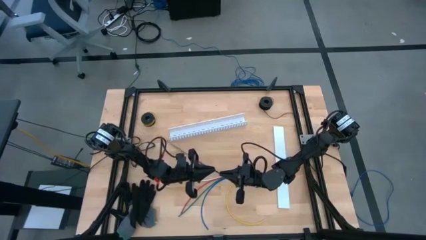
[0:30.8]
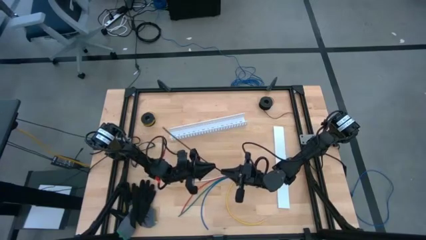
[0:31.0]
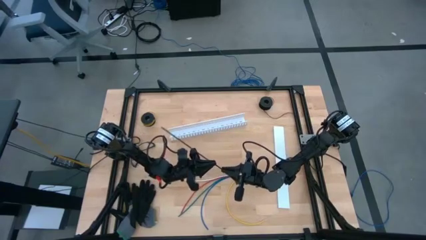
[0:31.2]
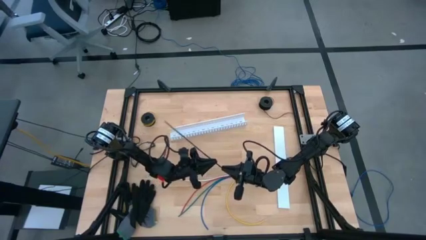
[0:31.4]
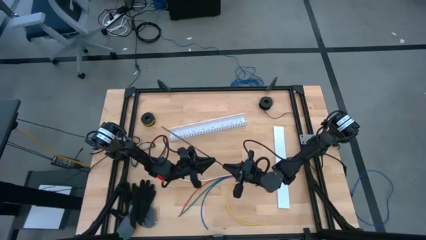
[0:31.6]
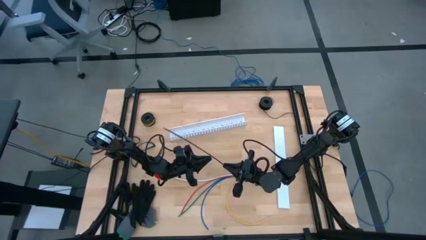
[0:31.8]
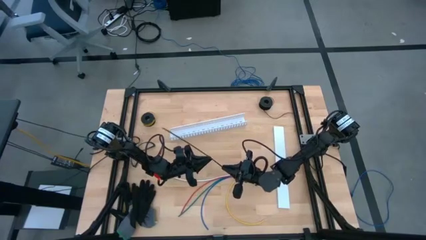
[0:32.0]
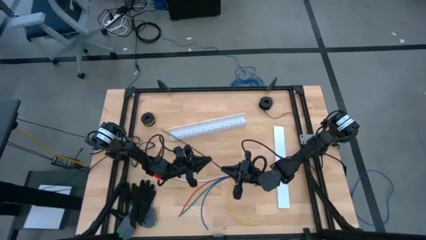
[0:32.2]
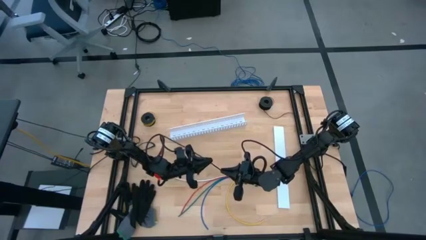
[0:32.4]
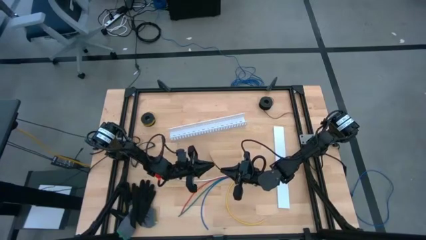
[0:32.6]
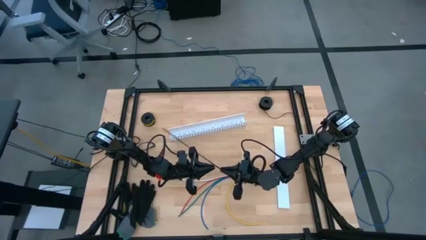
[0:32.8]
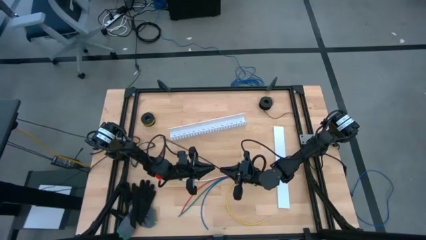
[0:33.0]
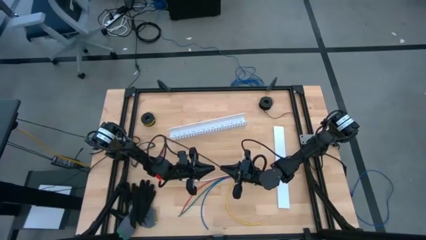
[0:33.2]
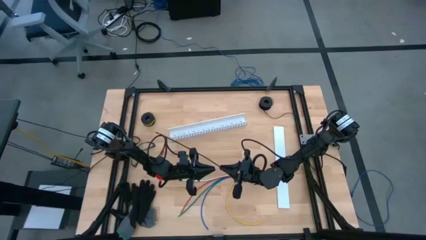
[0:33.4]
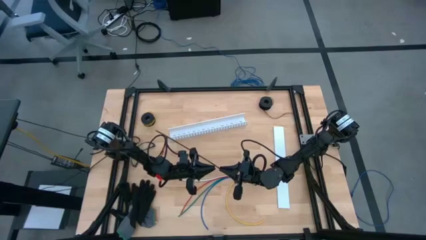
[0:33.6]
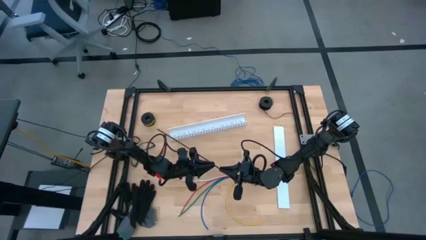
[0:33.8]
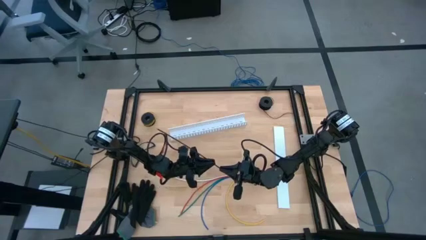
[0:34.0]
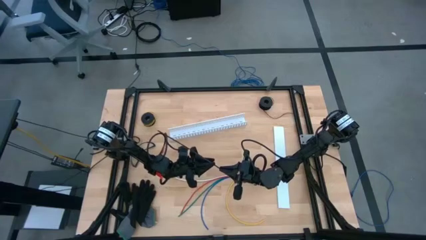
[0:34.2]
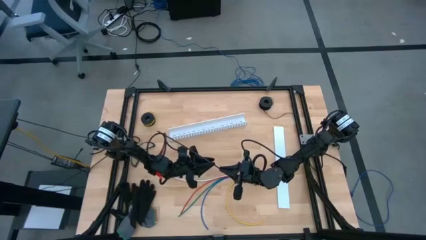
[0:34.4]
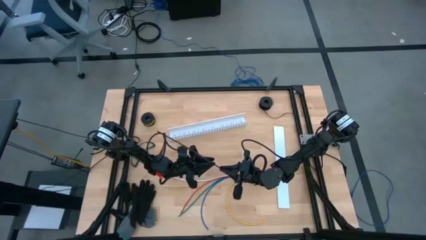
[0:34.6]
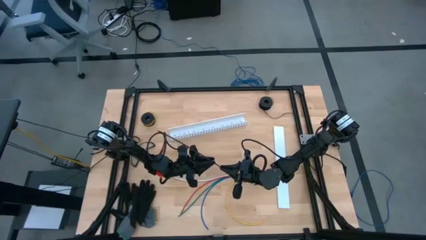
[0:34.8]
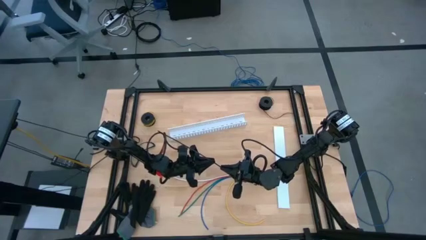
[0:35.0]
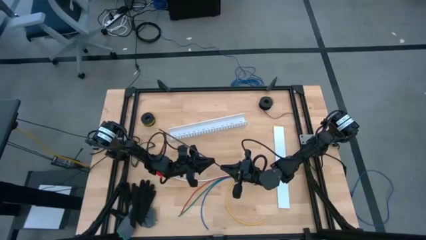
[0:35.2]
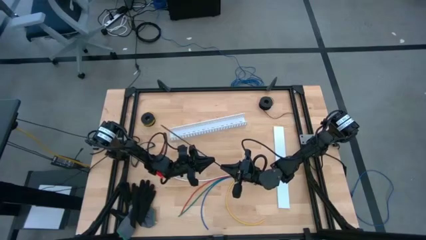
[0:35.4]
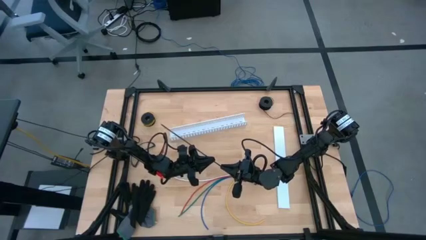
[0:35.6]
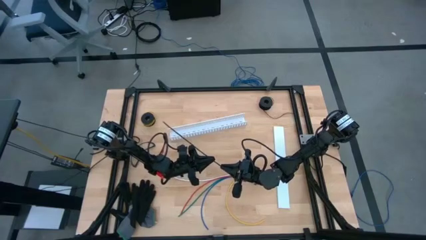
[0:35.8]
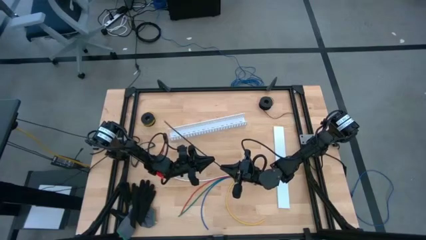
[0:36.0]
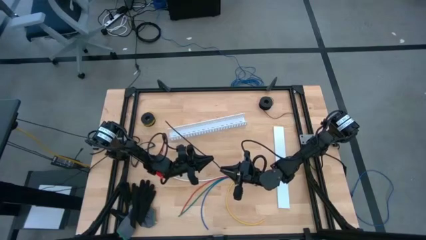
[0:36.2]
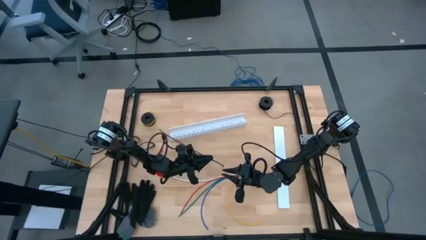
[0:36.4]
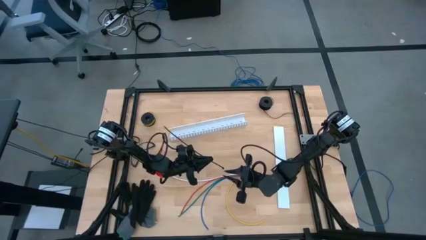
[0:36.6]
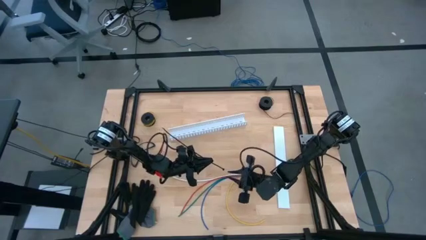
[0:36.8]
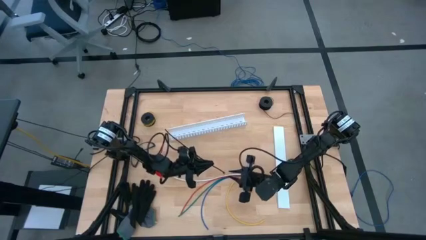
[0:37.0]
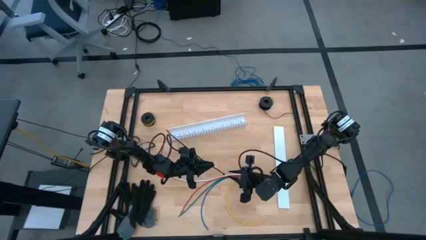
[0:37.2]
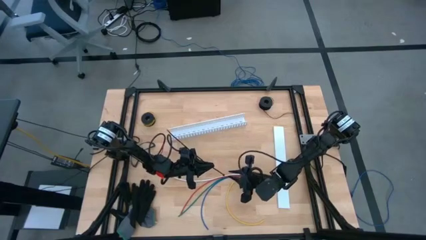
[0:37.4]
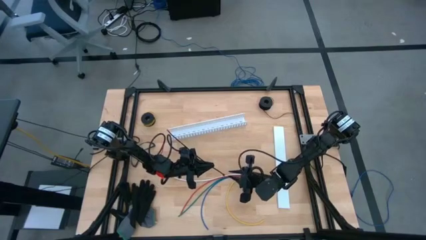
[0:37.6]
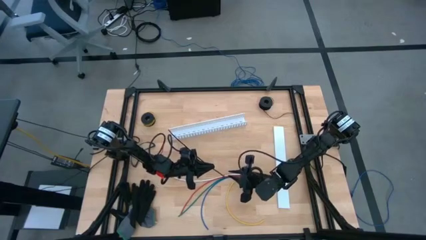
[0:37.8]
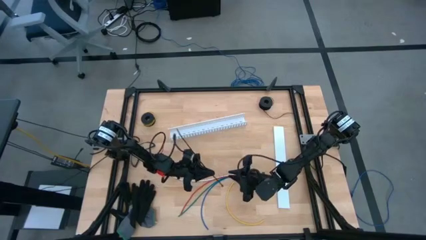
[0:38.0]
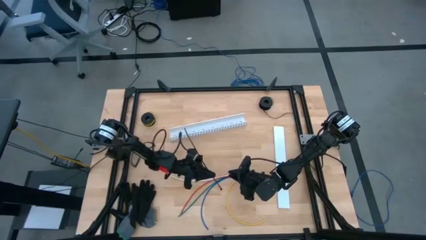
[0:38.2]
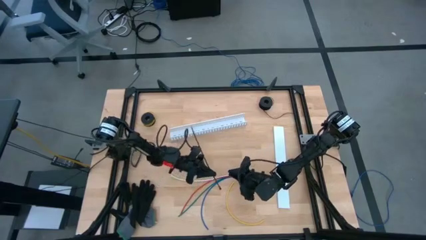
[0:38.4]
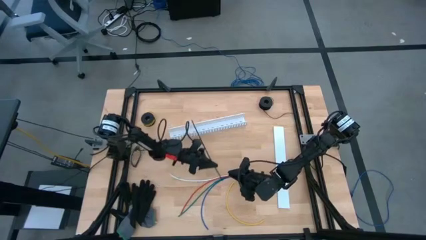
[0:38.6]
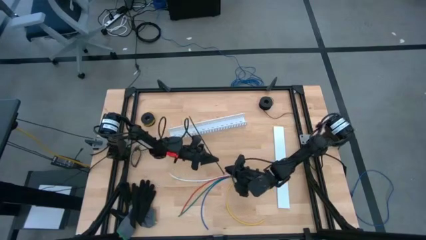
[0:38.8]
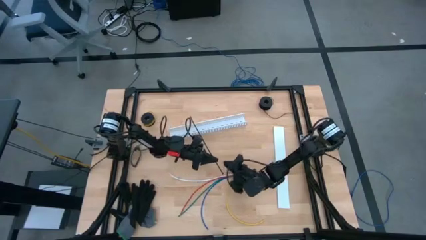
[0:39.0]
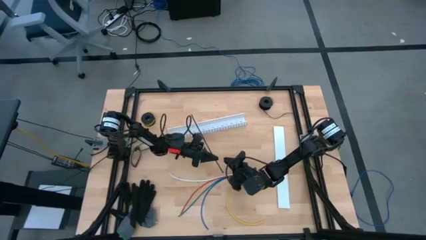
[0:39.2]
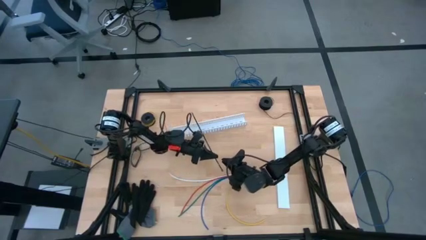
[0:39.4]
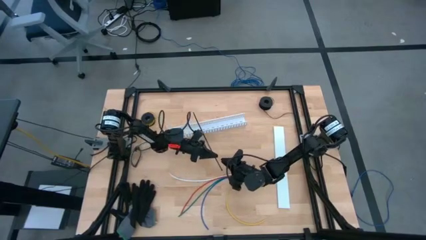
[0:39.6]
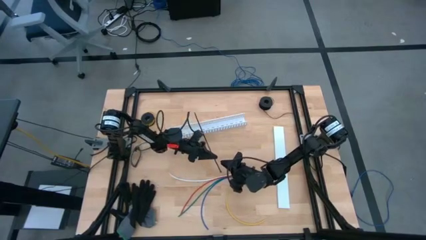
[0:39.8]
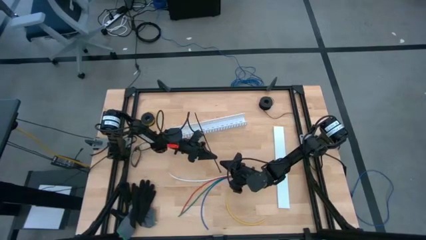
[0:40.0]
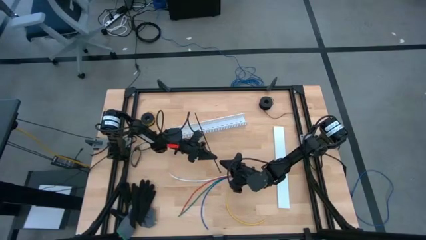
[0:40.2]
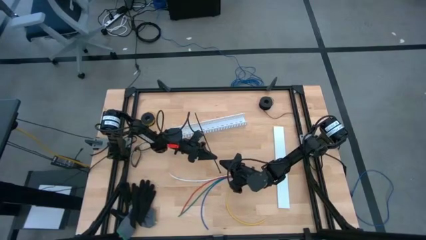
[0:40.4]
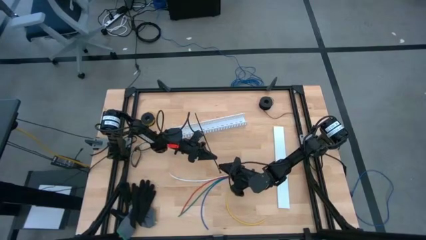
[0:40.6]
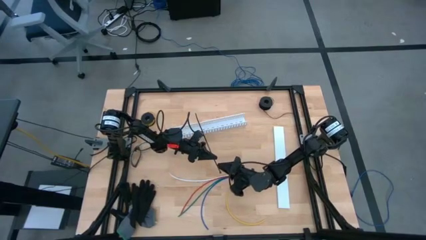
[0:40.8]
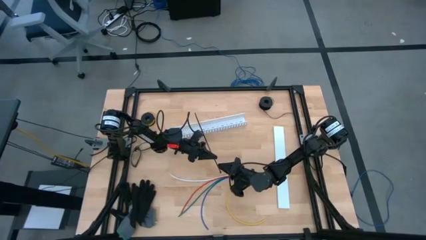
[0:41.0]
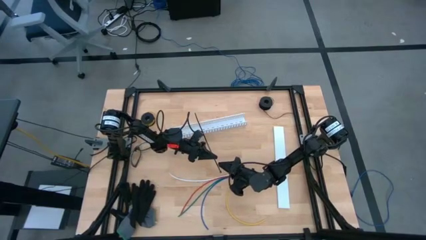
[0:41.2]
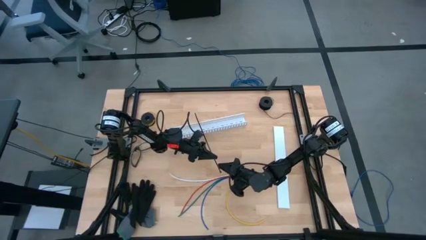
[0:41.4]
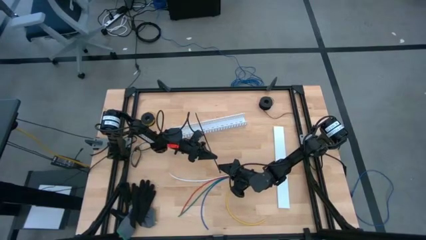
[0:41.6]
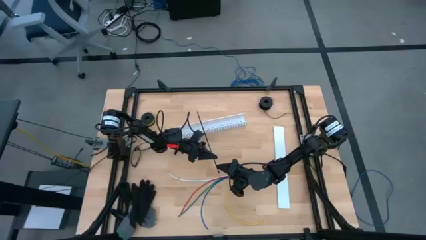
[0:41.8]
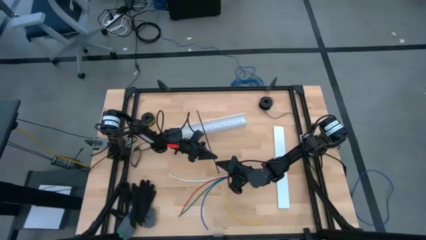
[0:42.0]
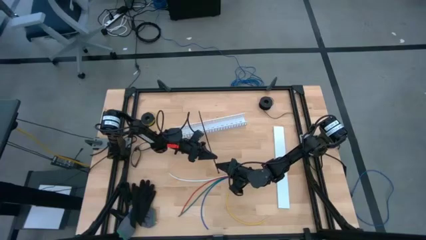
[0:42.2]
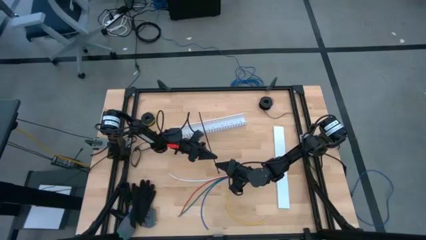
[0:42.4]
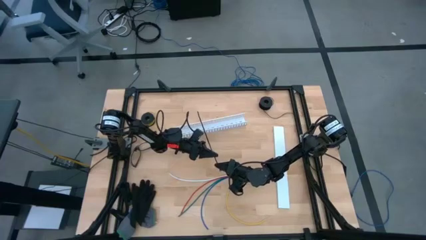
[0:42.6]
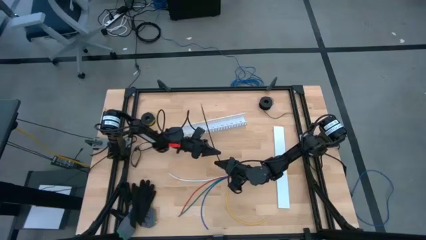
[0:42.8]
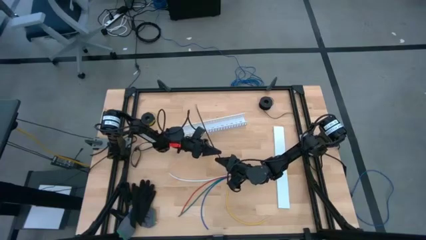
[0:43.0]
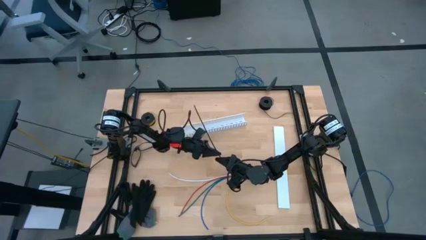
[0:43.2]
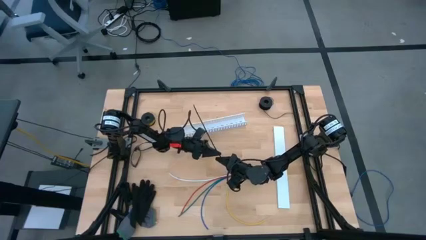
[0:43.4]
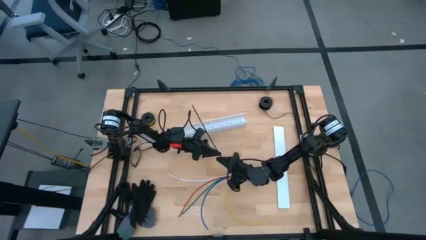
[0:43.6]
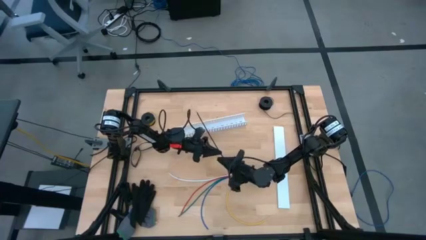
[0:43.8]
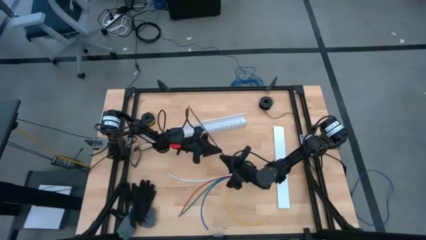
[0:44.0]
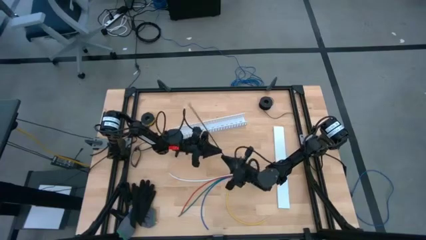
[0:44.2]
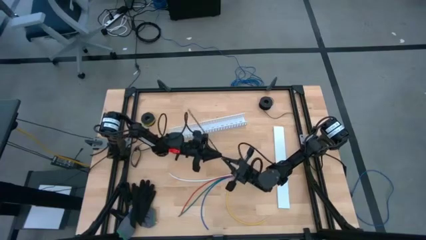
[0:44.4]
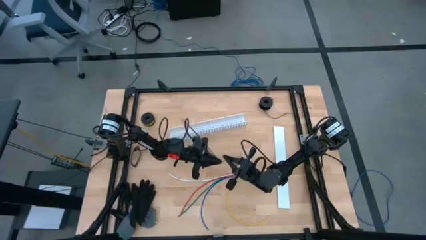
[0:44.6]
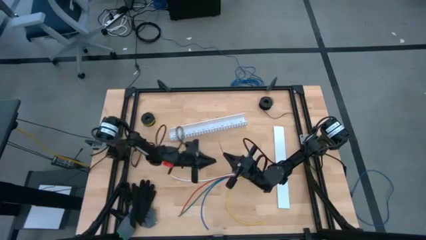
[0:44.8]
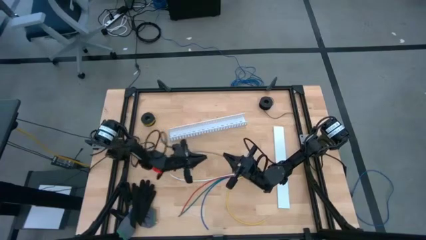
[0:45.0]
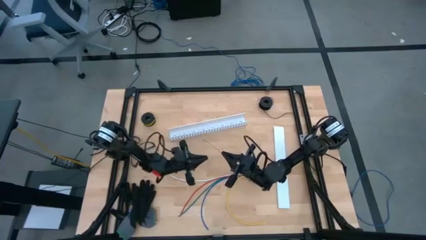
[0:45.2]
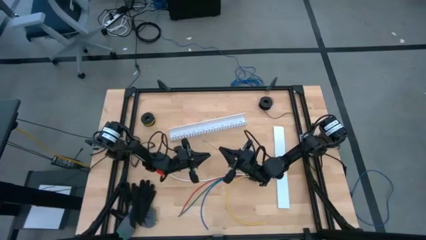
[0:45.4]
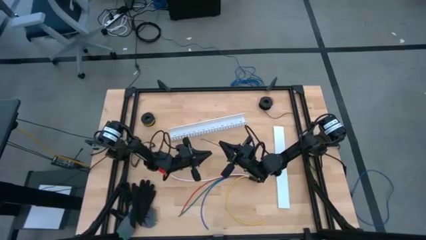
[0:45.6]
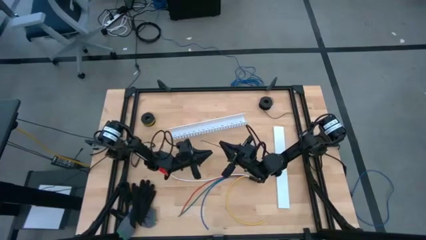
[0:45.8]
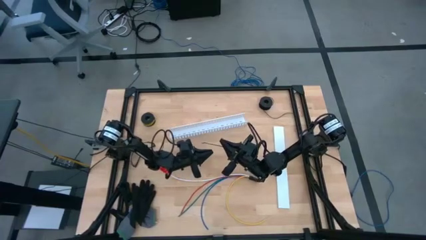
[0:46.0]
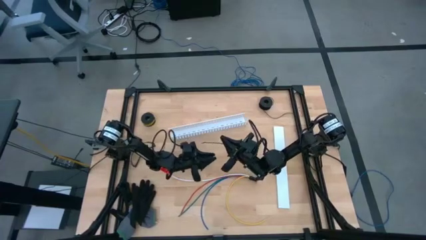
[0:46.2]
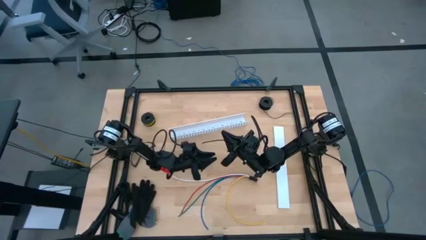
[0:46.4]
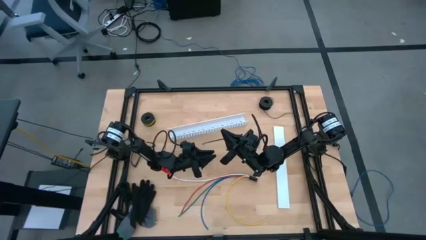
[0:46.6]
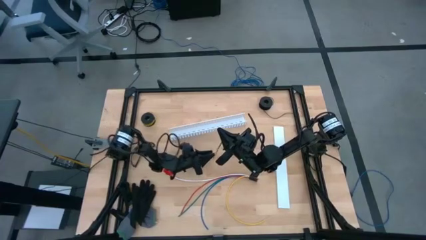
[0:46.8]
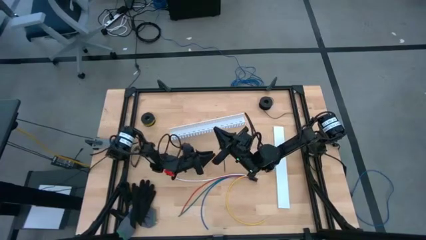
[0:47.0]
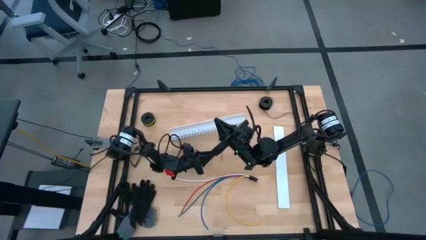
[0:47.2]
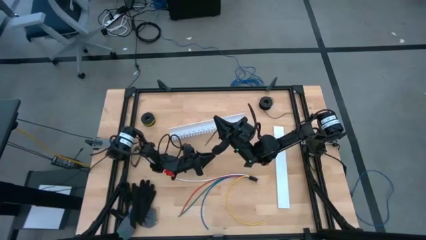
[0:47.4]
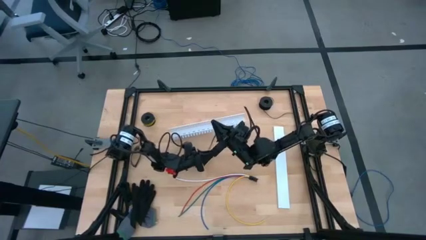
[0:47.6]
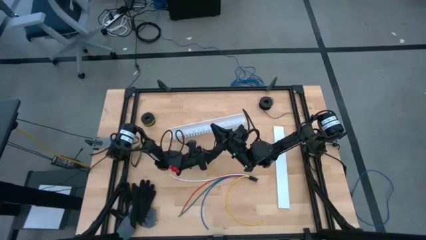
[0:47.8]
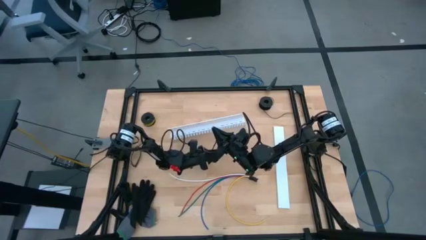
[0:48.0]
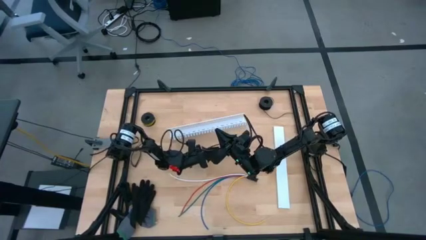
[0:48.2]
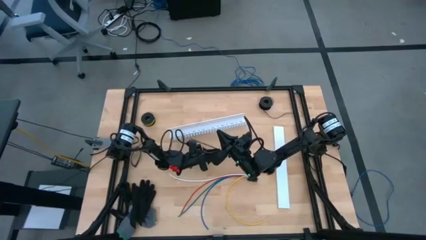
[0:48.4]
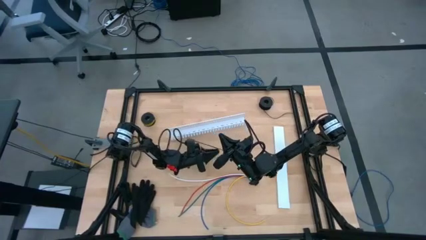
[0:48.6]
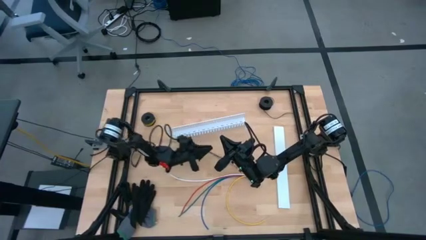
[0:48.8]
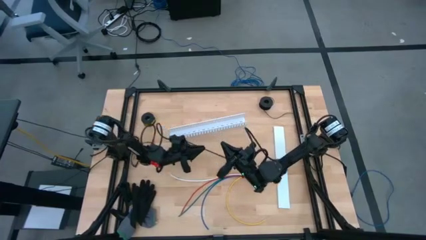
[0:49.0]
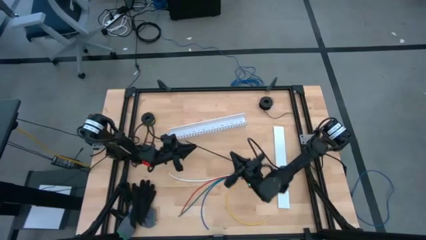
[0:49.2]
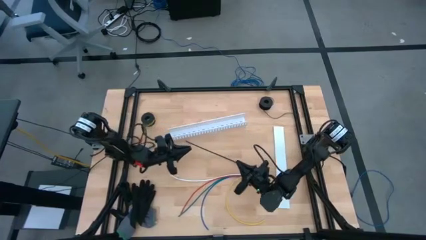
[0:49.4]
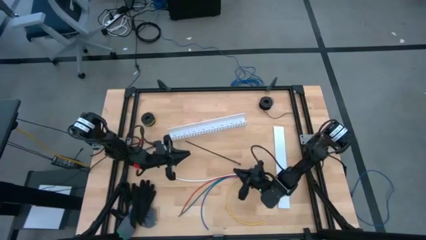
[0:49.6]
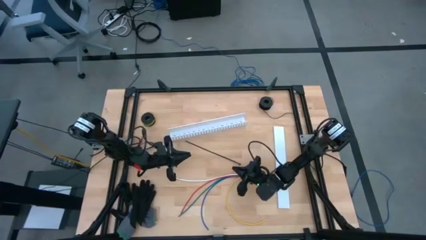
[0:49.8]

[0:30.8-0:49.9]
Task: Ziptie cables
Insert zip tie on the cable wire
